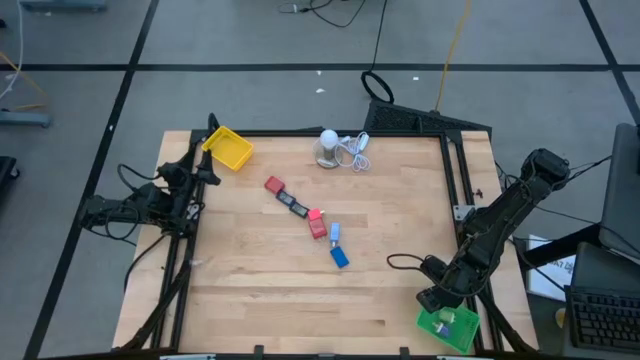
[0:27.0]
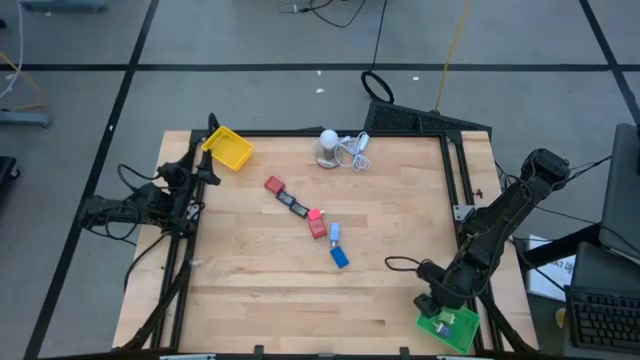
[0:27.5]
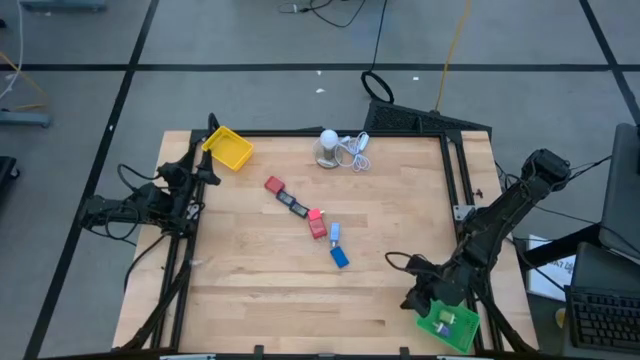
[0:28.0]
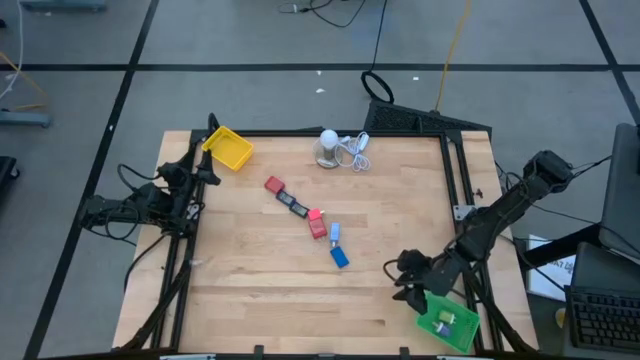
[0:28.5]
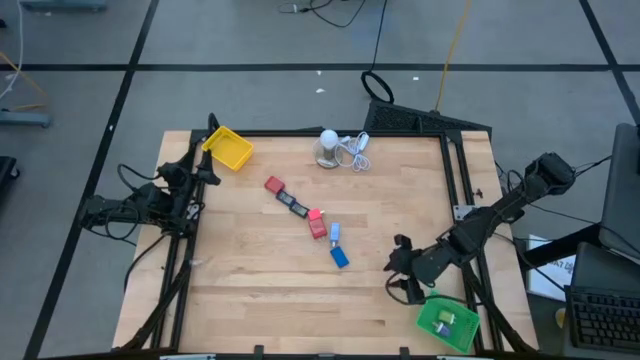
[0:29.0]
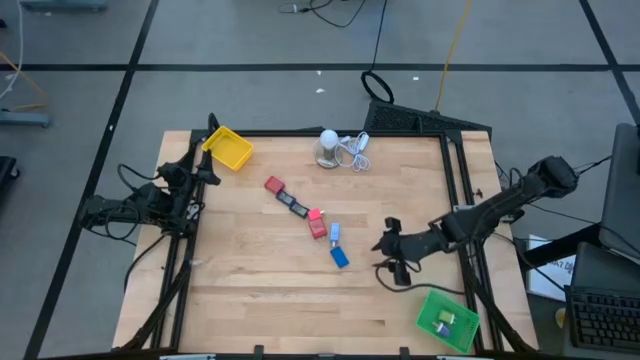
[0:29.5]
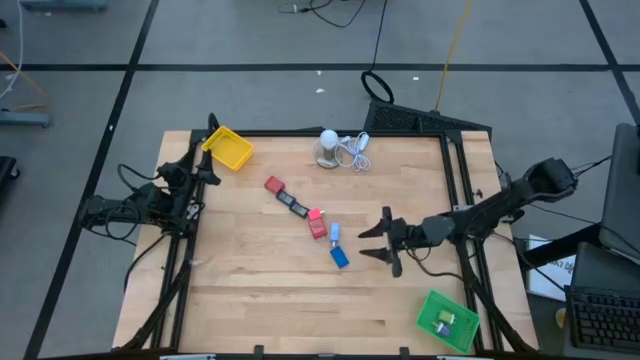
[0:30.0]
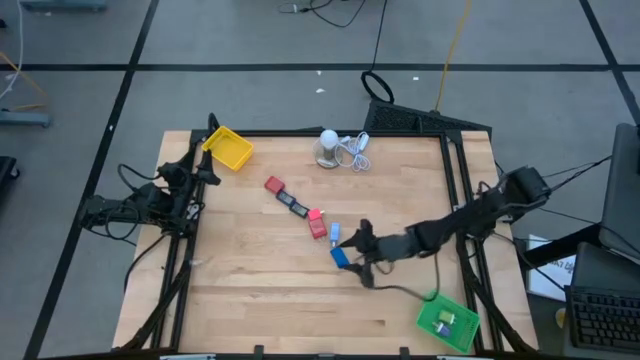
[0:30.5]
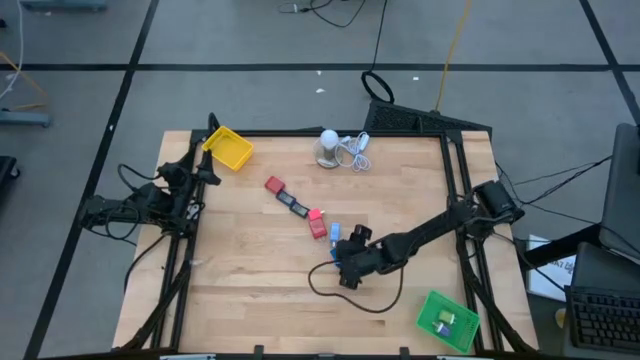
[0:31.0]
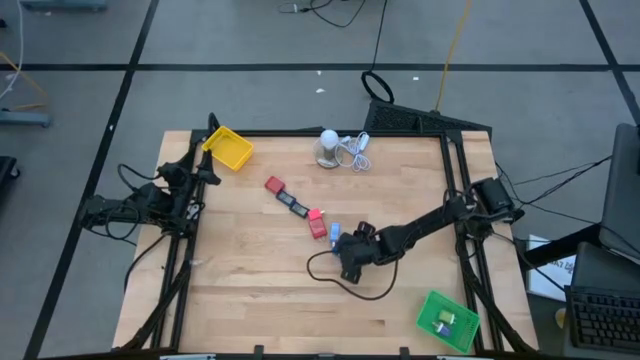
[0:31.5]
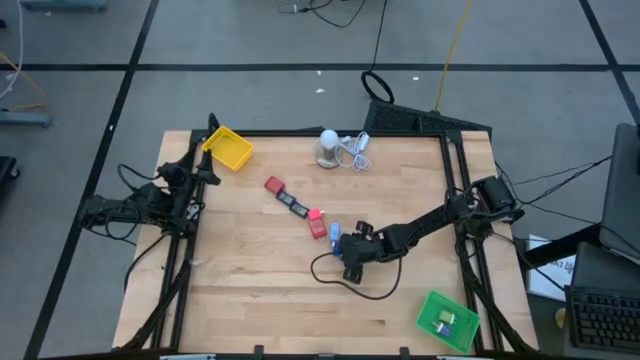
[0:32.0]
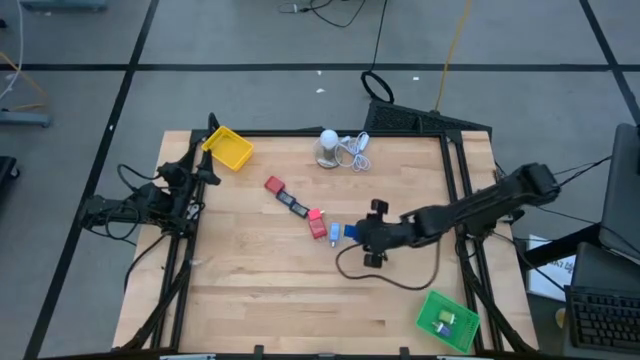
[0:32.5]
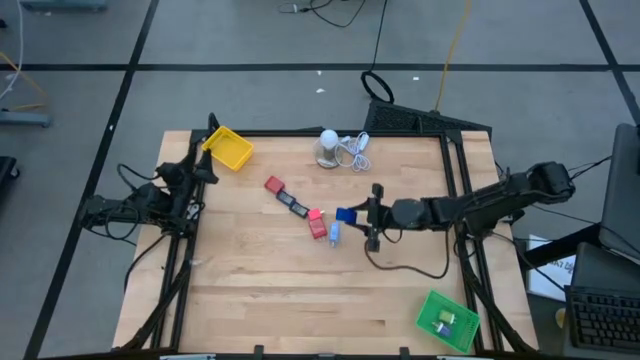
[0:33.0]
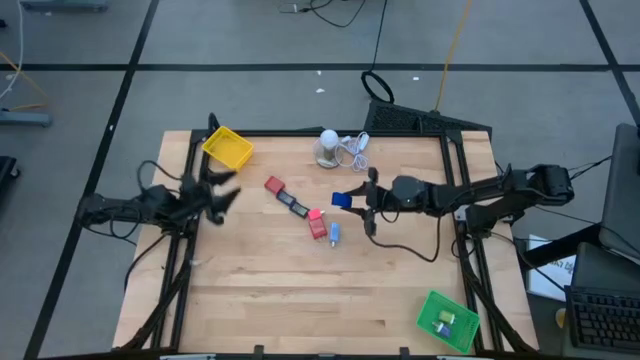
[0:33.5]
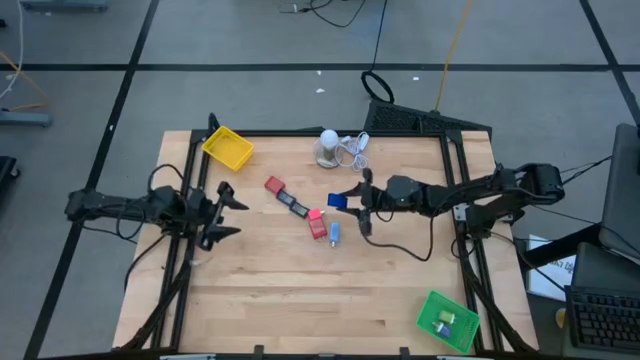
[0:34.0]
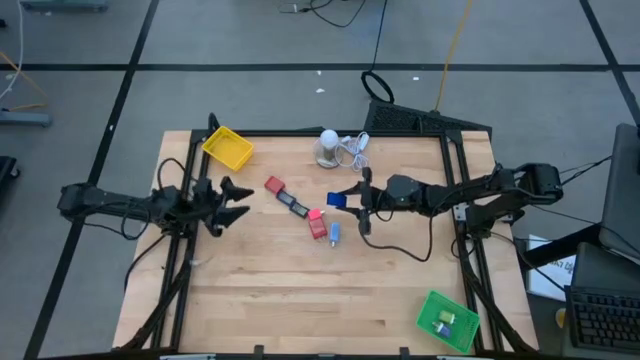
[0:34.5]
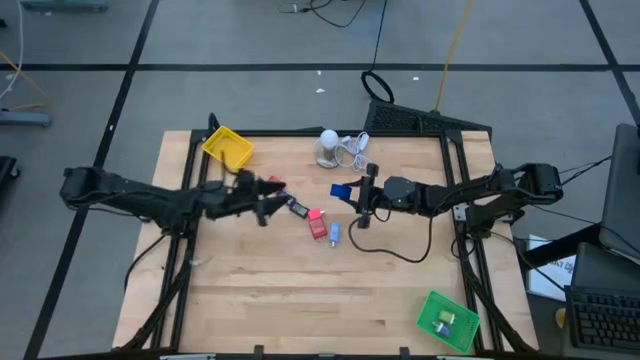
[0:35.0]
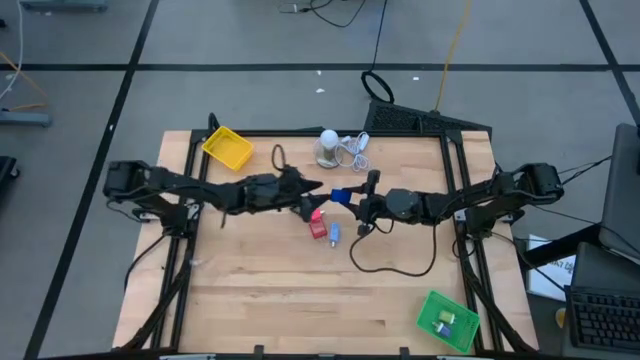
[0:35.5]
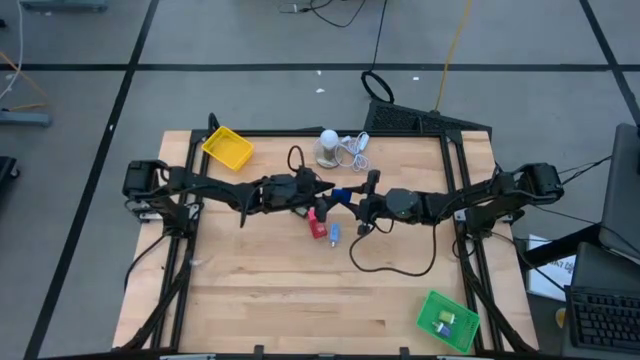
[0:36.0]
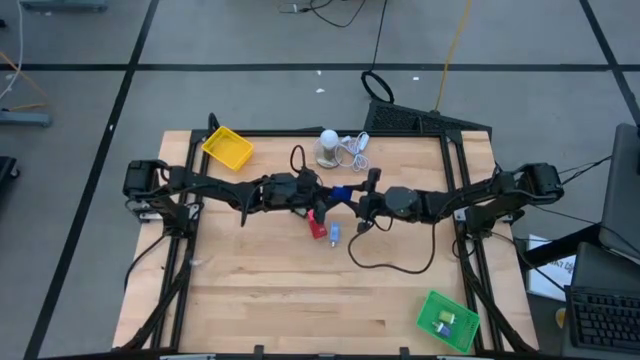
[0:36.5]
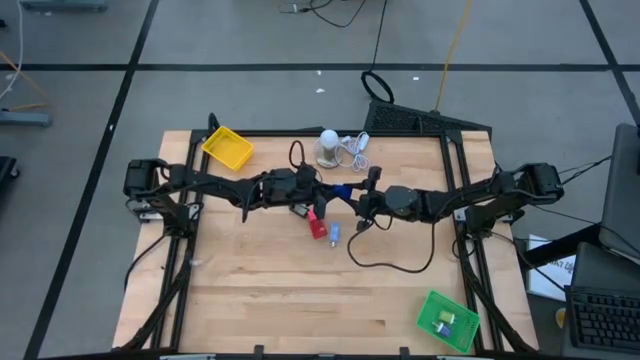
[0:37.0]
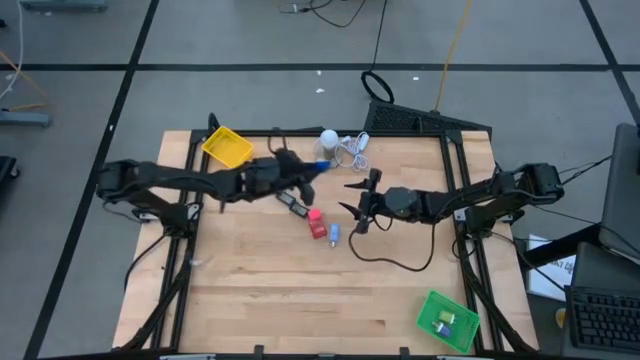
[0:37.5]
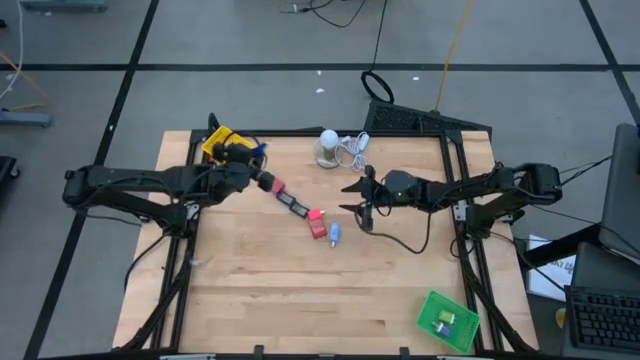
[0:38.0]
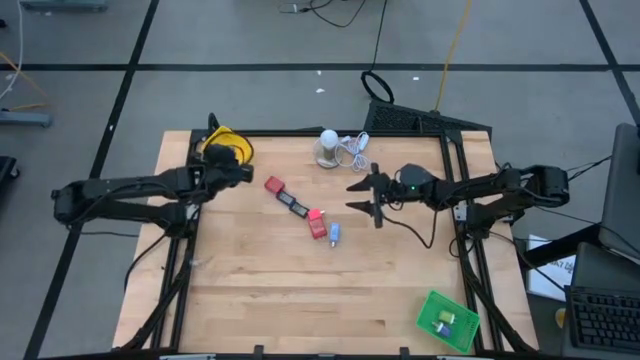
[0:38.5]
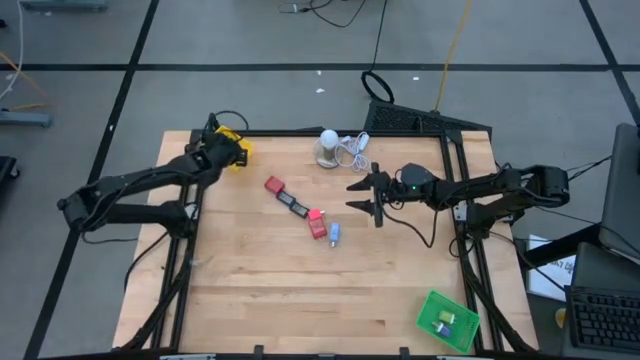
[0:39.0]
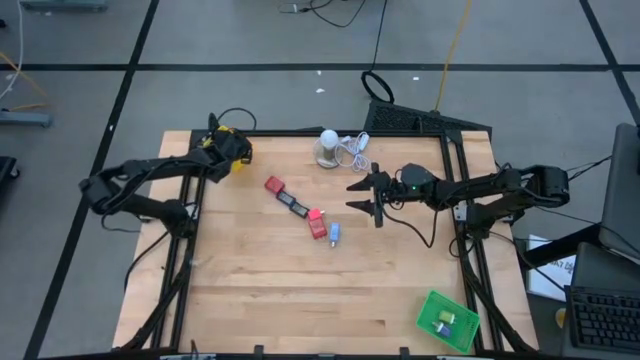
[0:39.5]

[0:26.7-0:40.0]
Task: Pick & Place Office items
Put the blue digital clock into the yellow bin

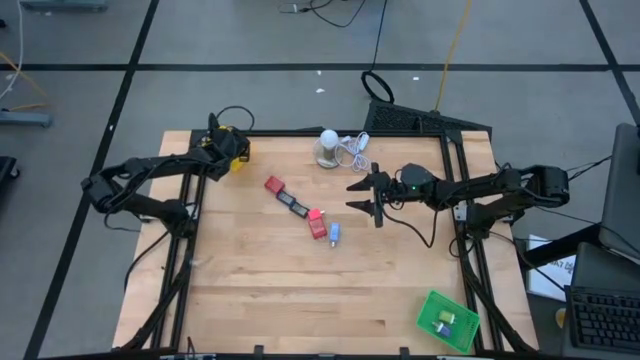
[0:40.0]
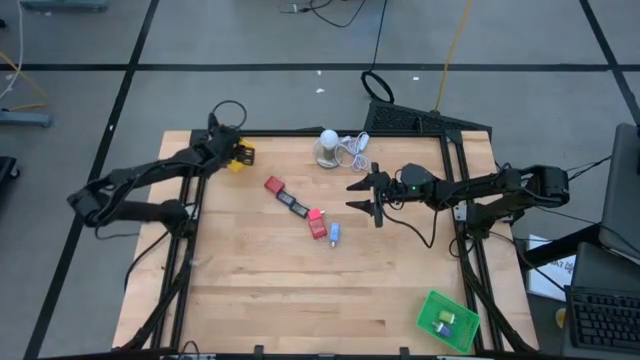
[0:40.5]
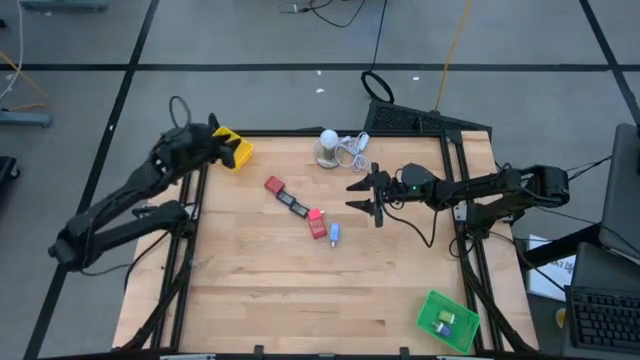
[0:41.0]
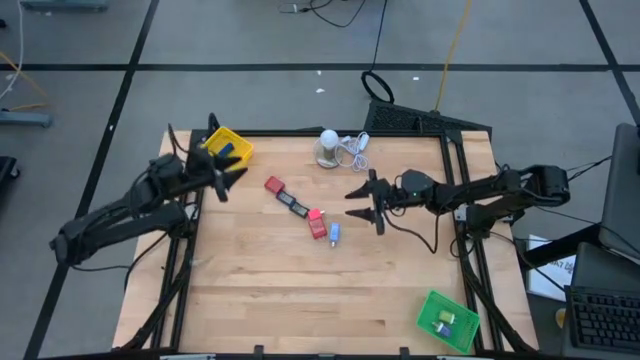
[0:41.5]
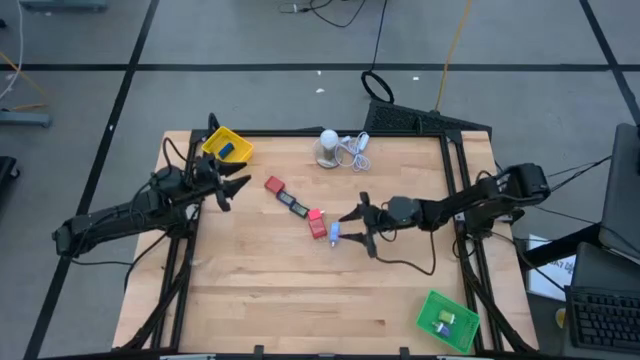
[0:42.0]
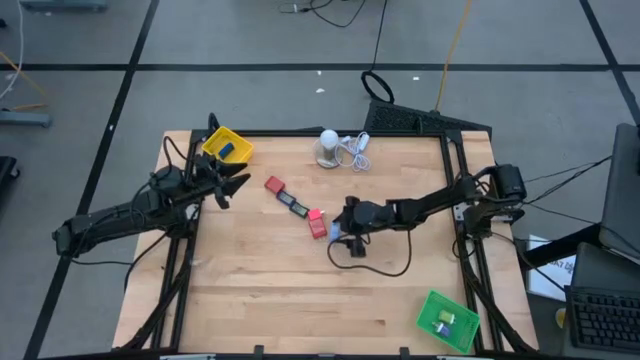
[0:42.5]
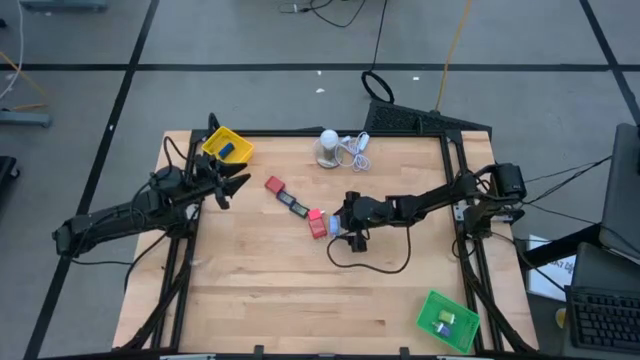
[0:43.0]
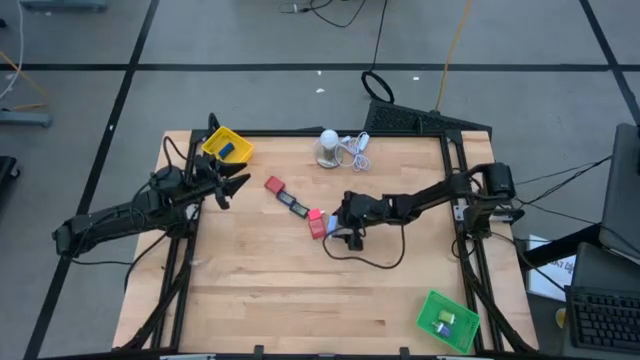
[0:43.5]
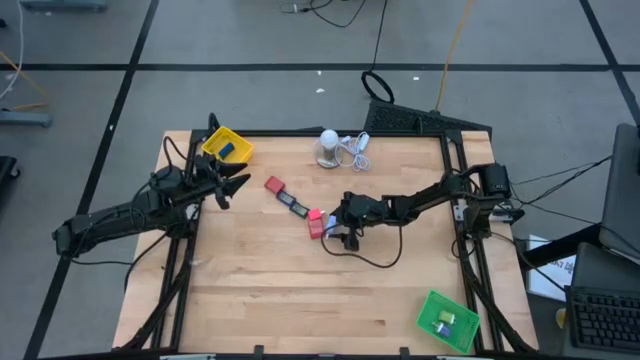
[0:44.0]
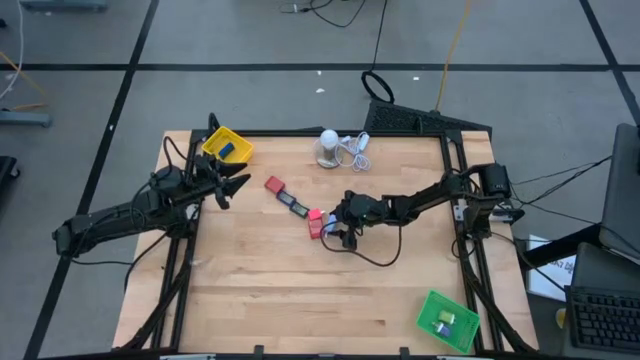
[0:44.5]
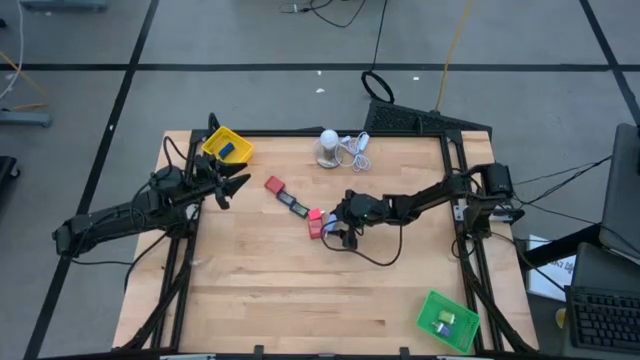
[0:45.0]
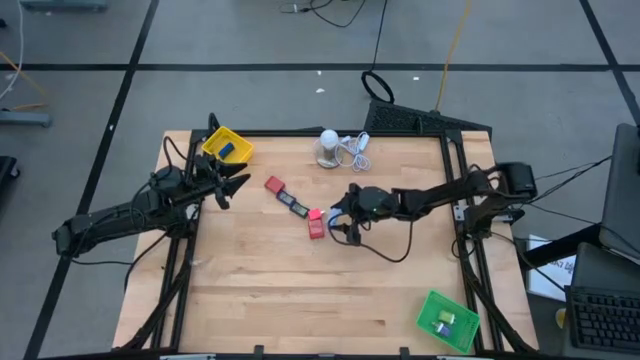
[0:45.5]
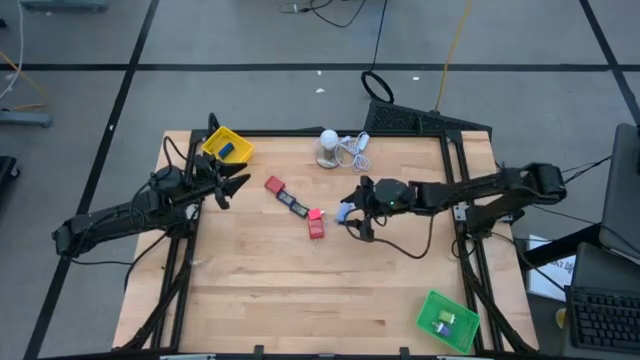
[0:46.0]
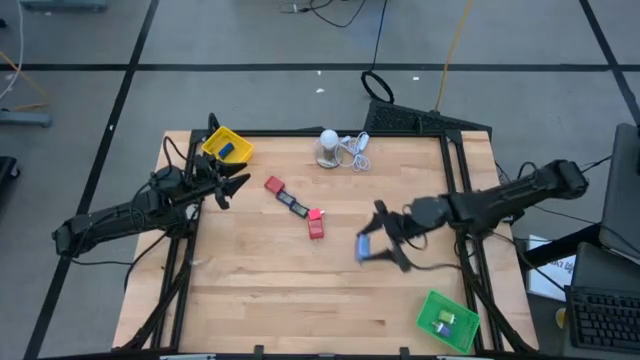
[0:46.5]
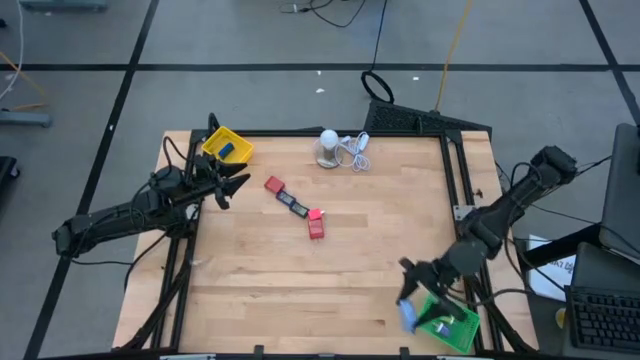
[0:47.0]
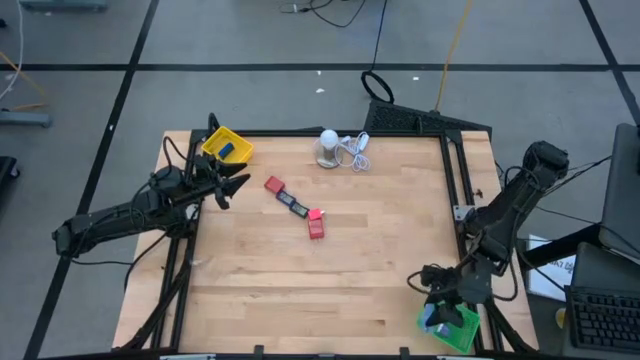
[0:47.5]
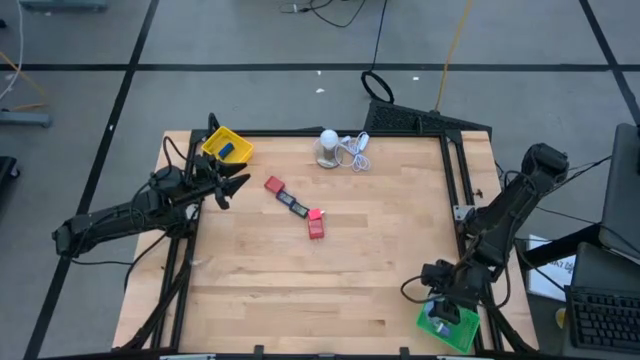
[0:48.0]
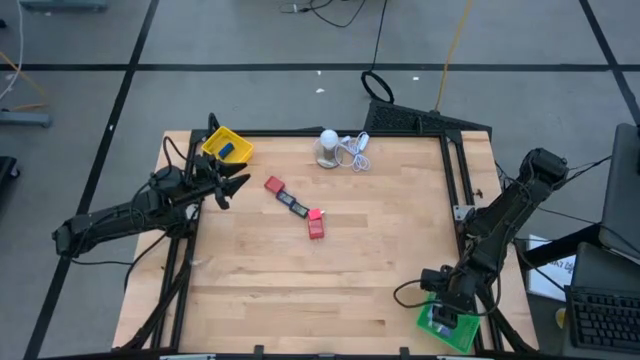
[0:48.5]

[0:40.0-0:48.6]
Put the light blue charger adapter into the green bin
